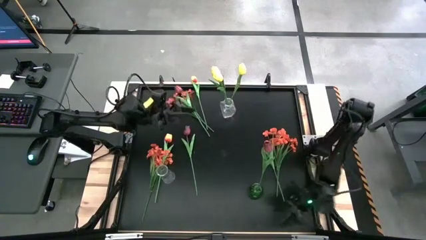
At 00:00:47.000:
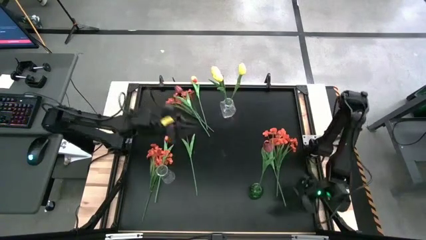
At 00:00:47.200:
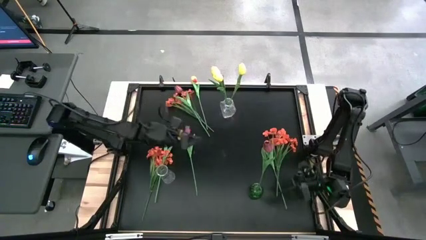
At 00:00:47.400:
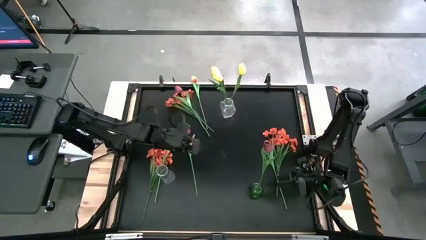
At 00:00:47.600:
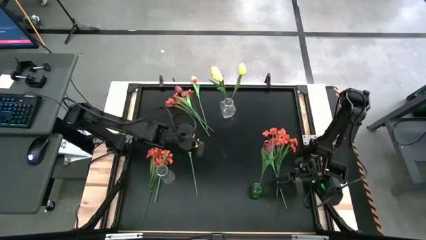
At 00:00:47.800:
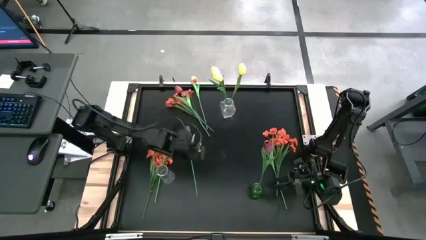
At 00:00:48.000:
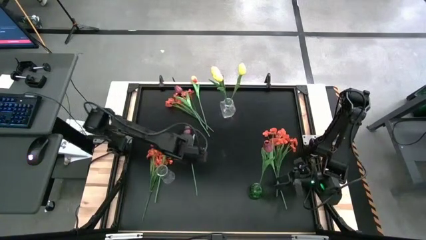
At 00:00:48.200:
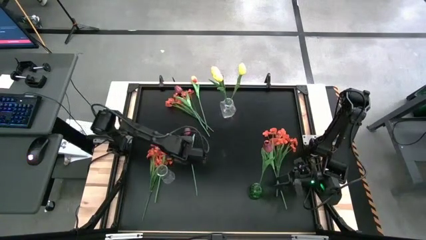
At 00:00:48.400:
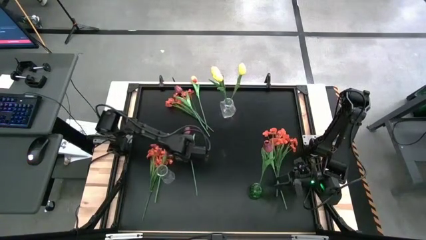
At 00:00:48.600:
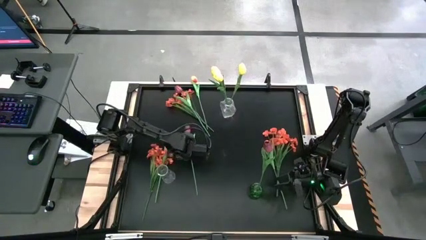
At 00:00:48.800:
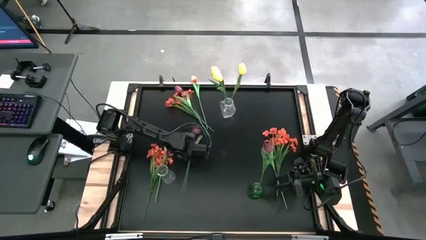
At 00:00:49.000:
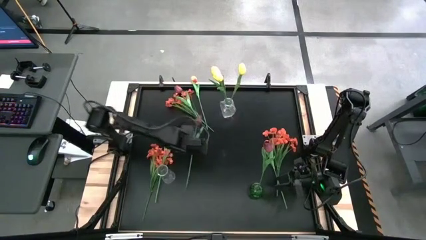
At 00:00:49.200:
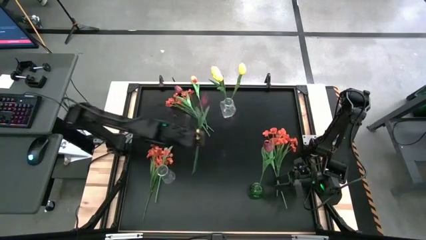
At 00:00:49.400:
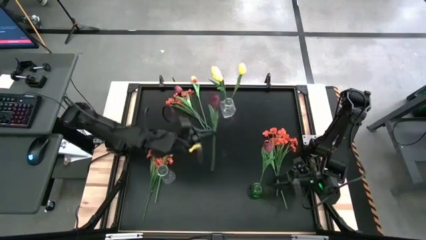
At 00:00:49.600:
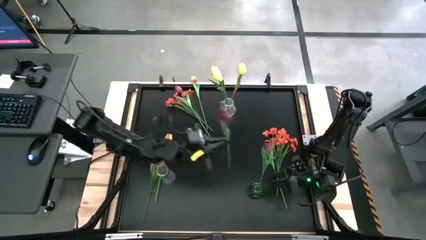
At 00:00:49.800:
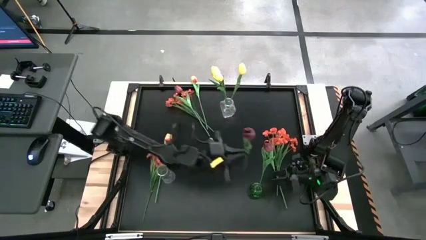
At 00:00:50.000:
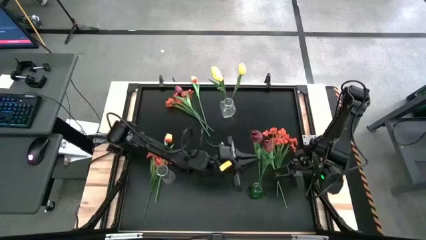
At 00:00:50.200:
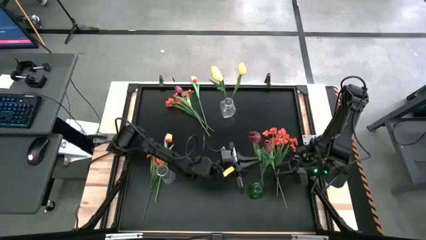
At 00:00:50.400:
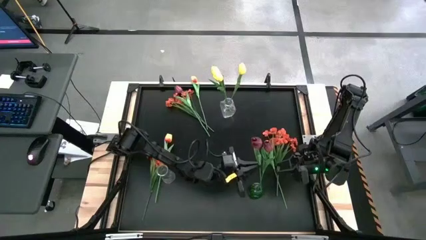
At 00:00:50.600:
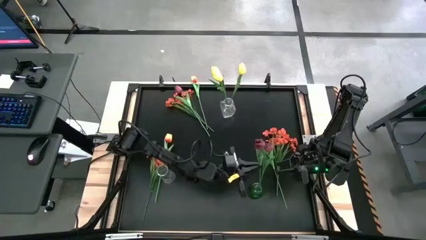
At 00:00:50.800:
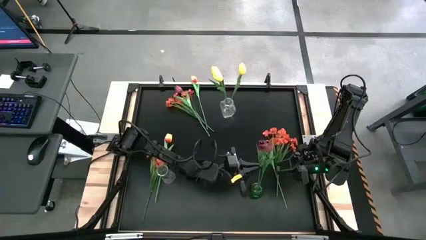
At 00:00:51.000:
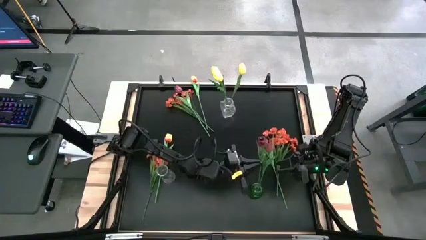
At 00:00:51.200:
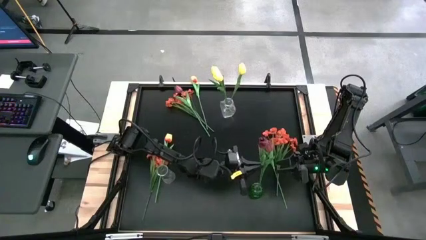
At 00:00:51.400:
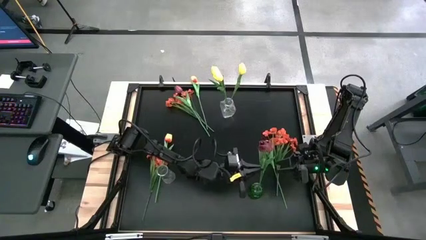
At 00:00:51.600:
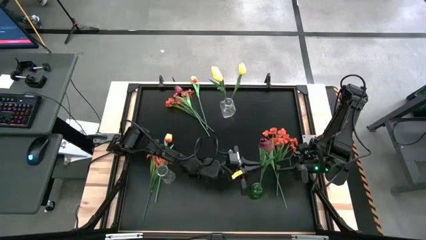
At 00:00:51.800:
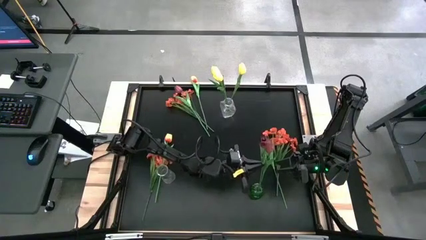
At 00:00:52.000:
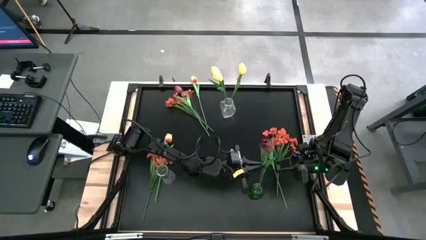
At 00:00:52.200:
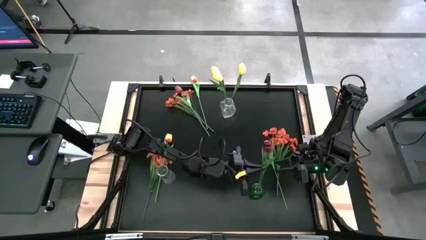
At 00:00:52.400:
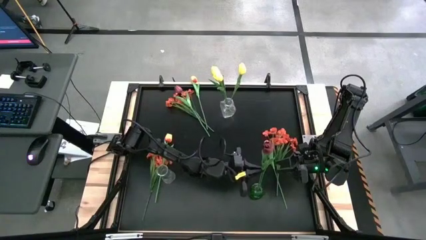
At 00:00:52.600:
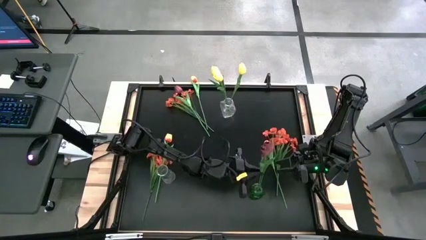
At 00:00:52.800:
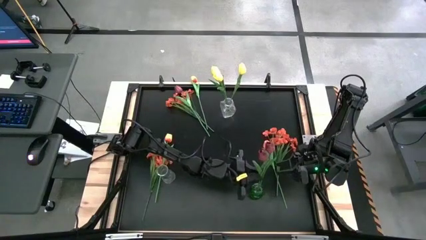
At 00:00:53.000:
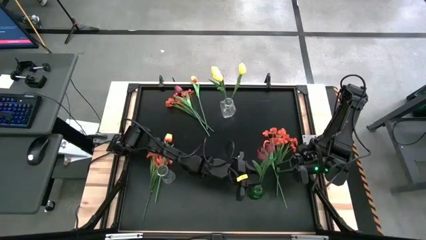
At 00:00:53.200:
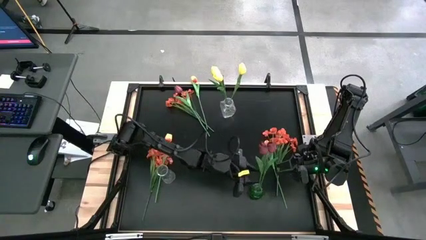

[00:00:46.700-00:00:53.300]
Task: Sort flowers into vase by color
Put the bottom red tulip into the green vase

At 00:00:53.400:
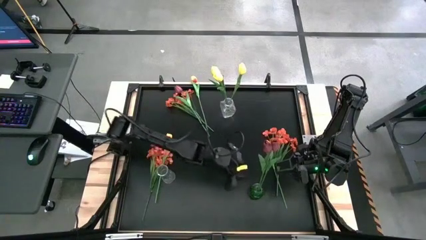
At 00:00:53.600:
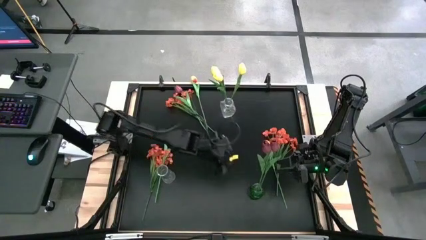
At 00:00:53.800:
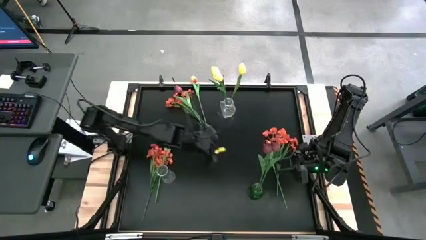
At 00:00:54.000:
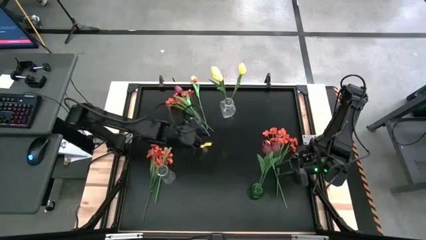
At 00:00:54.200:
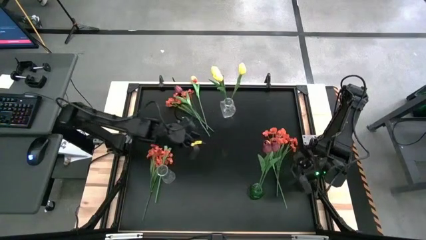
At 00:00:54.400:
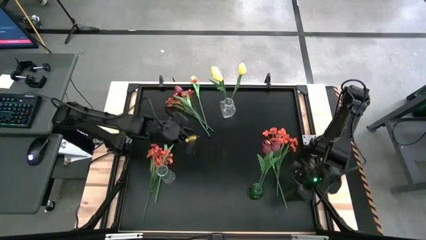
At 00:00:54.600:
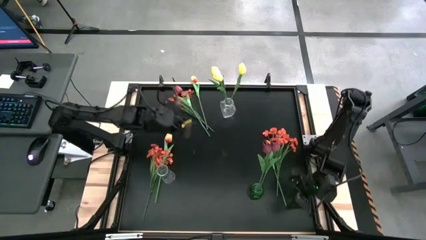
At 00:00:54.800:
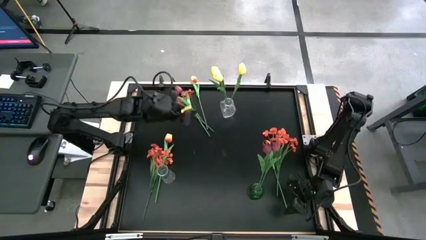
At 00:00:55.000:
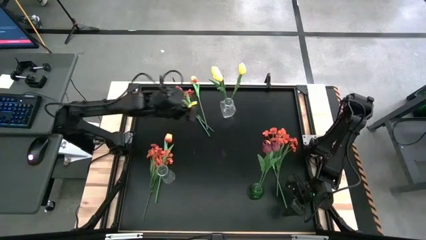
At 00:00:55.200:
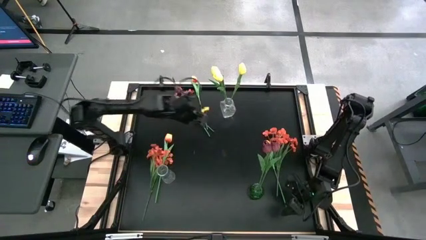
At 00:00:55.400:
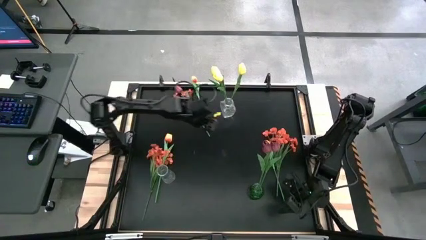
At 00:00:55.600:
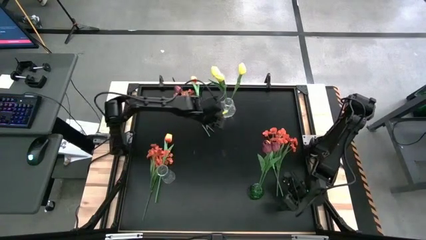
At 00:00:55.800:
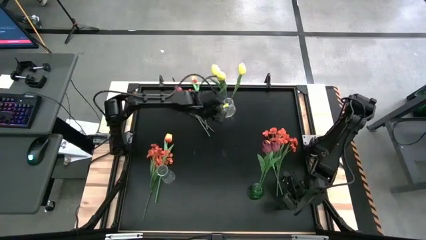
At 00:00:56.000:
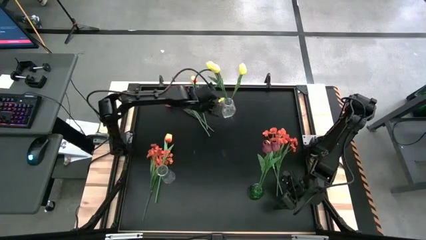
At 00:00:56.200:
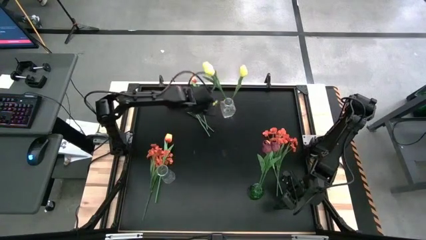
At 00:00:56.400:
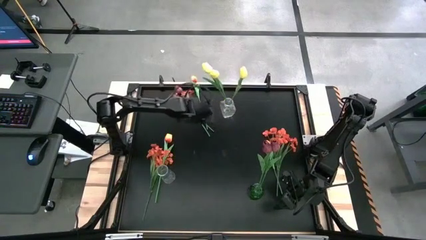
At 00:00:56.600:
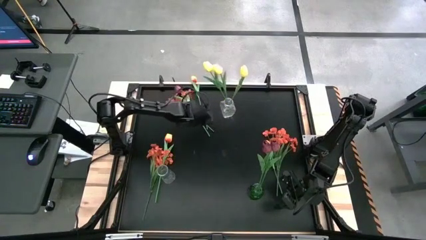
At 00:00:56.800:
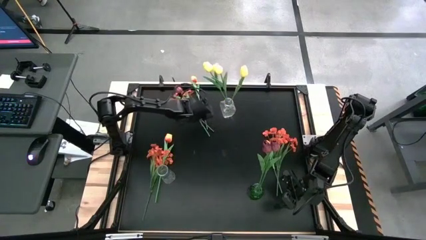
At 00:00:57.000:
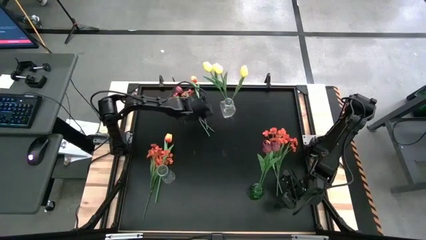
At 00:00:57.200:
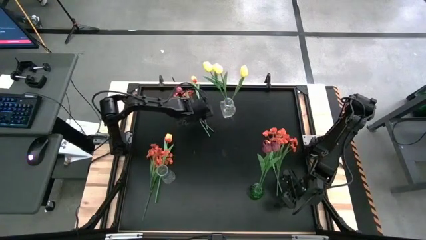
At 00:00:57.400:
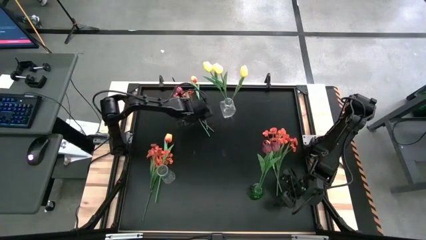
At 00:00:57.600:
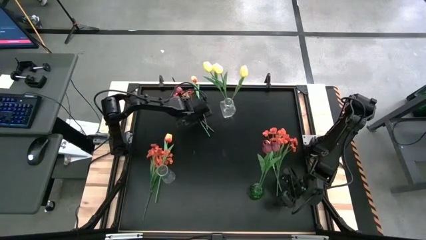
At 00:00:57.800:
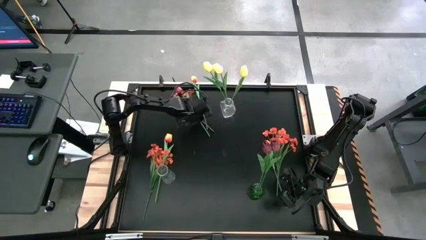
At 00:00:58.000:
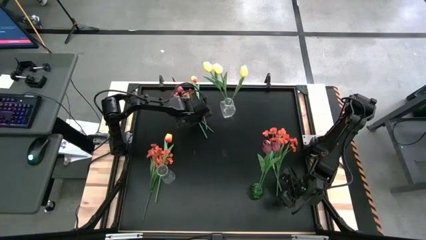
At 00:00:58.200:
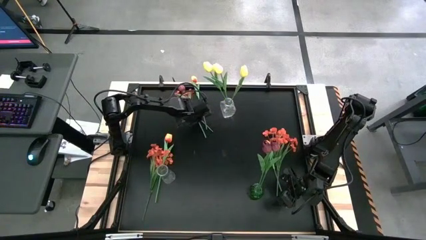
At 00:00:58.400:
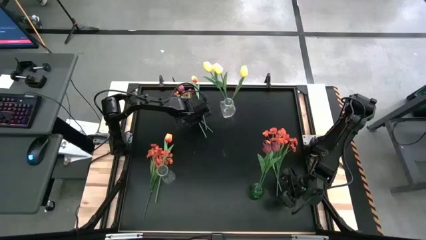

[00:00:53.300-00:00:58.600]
Put the red tulip into the green vase

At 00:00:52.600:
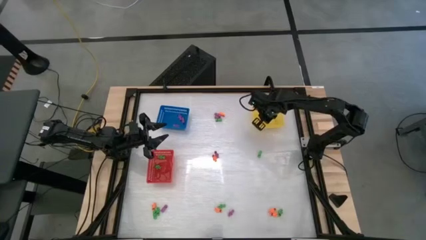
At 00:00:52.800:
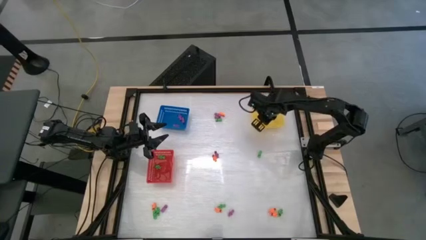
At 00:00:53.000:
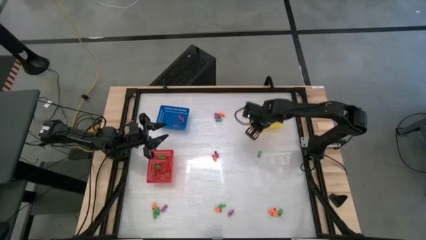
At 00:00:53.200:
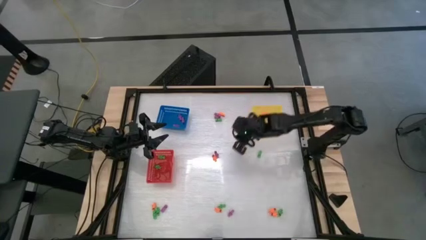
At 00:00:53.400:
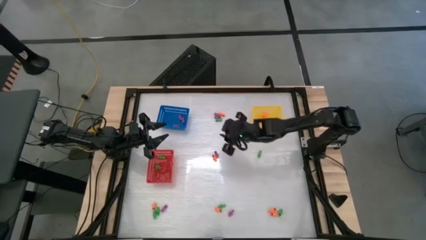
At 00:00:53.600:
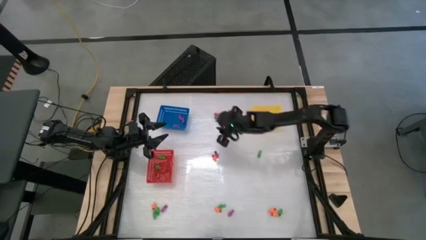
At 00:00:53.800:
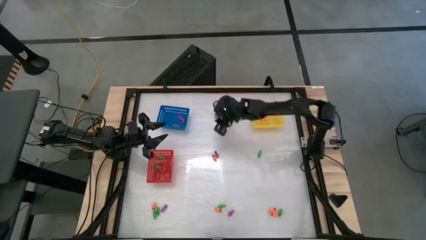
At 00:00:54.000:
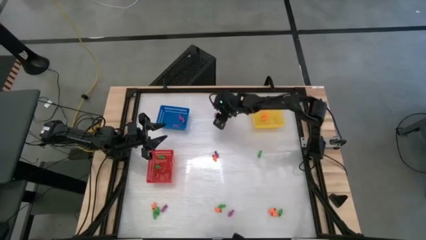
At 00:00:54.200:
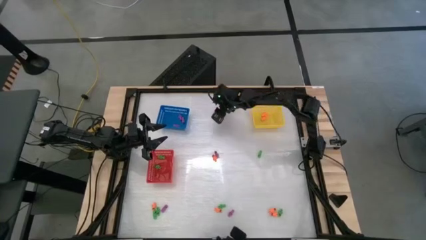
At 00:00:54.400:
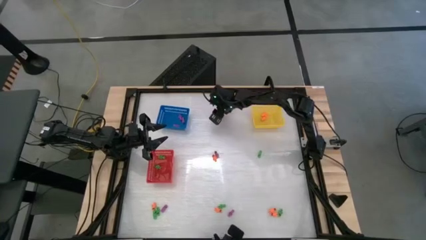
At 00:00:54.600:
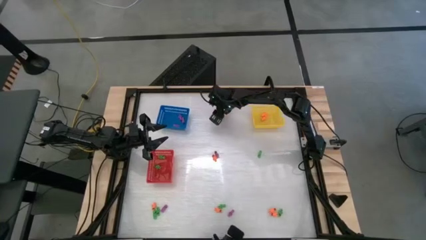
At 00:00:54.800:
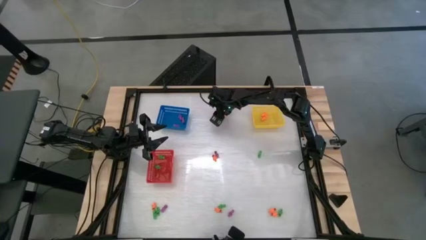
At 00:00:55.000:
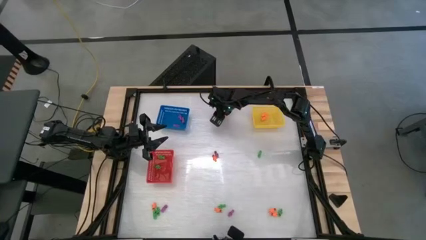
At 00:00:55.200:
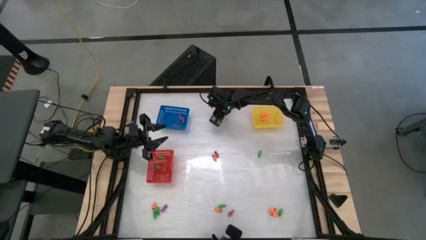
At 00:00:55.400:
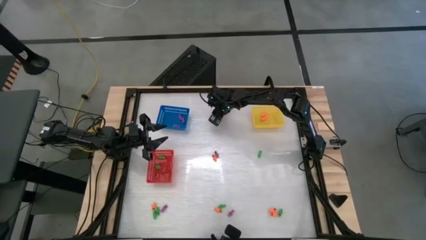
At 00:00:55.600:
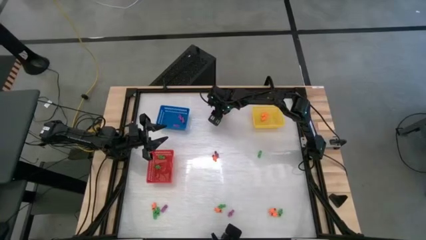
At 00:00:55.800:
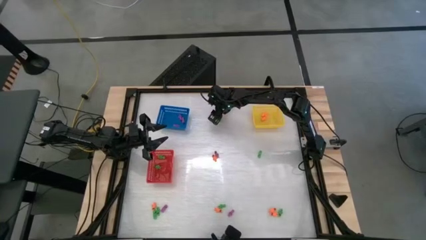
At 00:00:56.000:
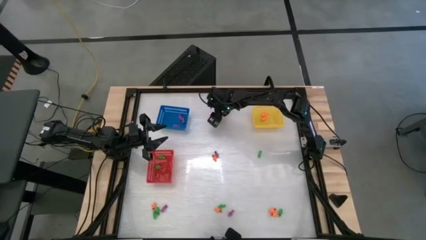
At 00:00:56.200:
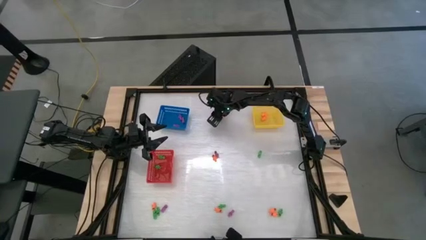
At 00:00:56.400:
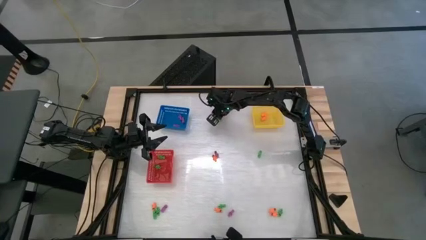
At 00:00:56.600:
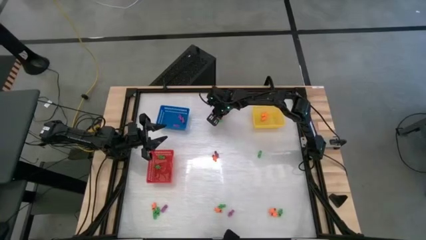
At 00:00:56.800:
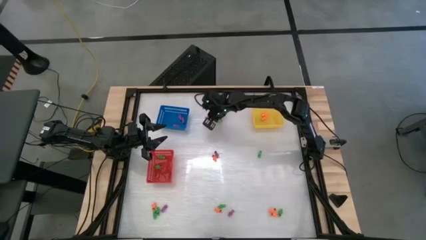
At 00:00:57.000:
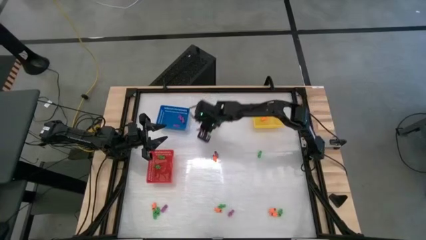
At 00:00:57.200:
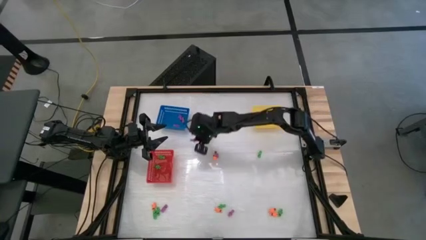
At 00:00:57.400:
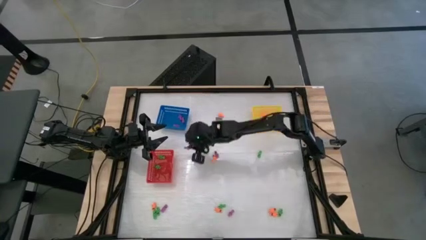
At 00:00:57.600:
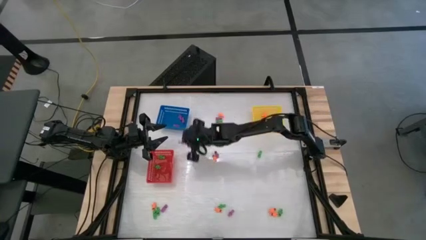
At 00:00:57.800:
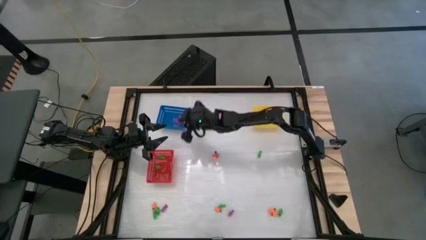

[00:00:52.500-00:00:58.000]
Task: Sort Halloween decoration
Put the violet skeleton toy into the blue bin
